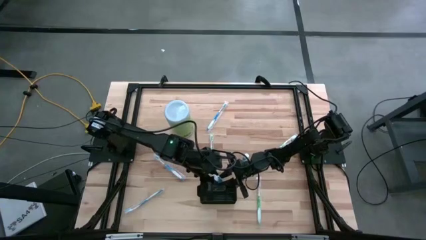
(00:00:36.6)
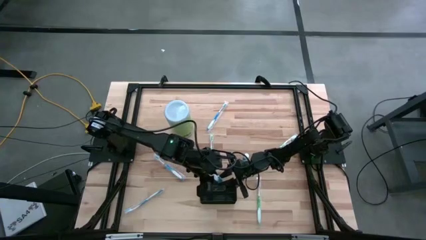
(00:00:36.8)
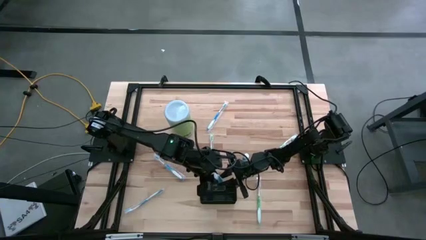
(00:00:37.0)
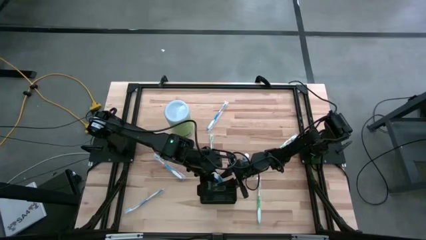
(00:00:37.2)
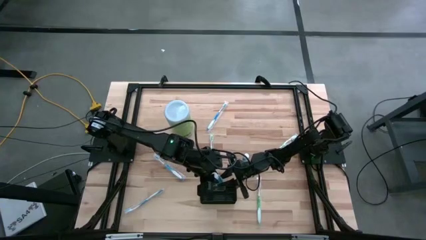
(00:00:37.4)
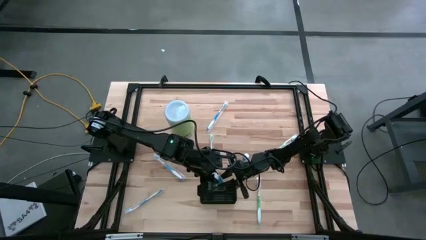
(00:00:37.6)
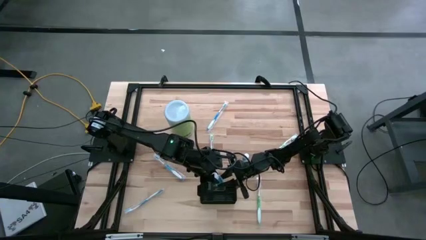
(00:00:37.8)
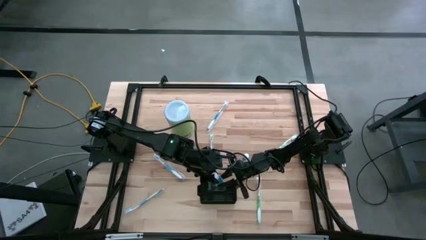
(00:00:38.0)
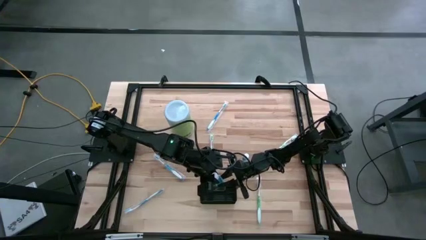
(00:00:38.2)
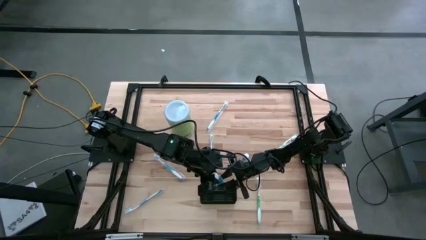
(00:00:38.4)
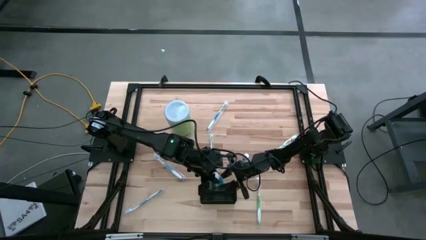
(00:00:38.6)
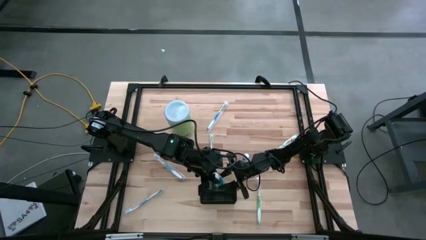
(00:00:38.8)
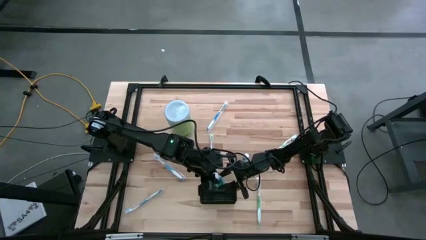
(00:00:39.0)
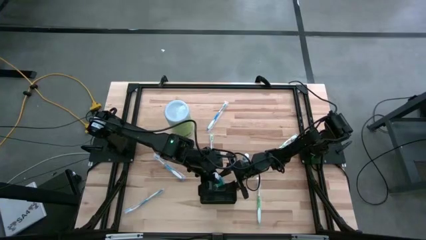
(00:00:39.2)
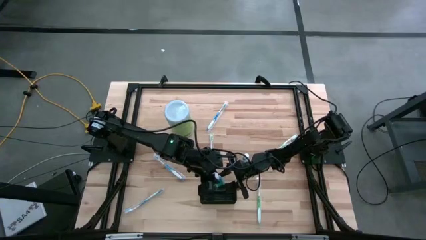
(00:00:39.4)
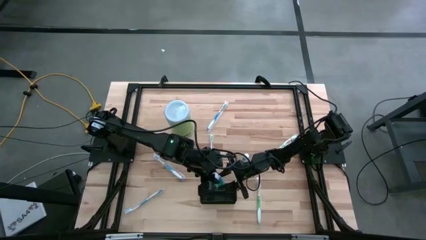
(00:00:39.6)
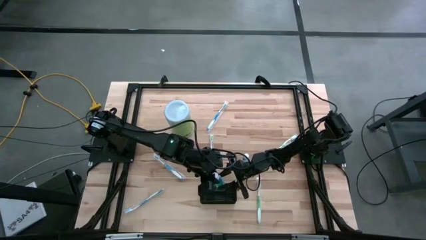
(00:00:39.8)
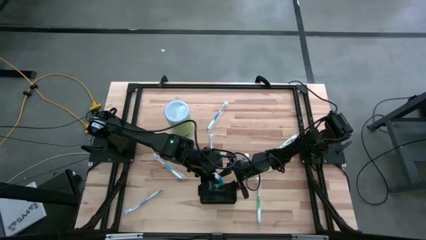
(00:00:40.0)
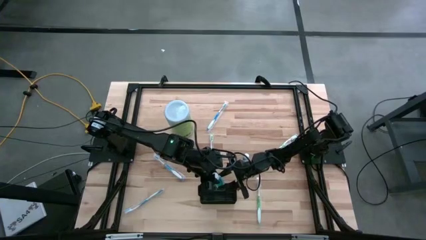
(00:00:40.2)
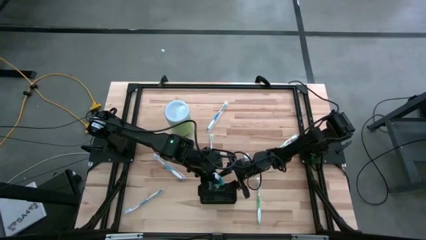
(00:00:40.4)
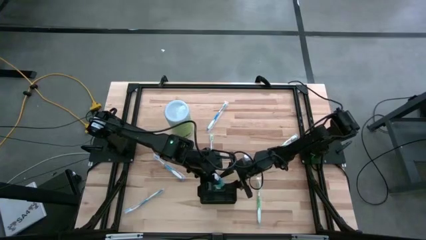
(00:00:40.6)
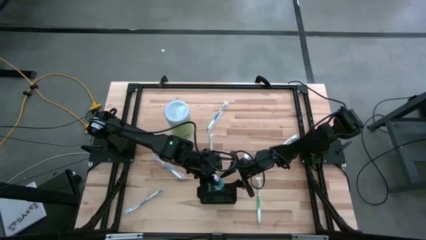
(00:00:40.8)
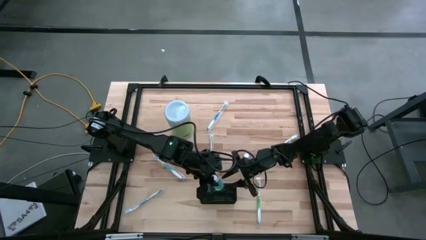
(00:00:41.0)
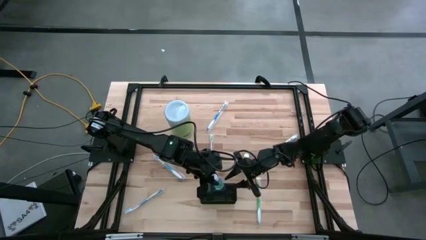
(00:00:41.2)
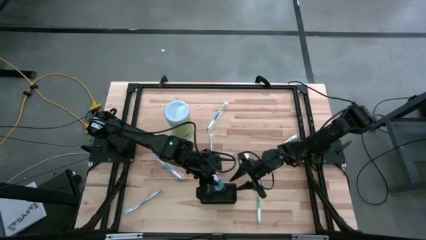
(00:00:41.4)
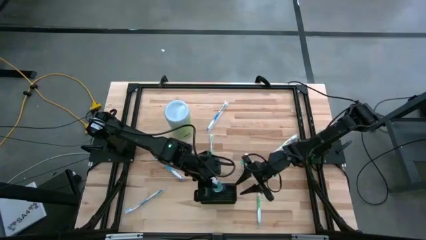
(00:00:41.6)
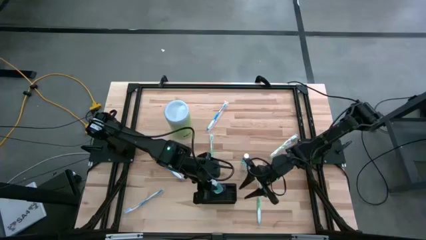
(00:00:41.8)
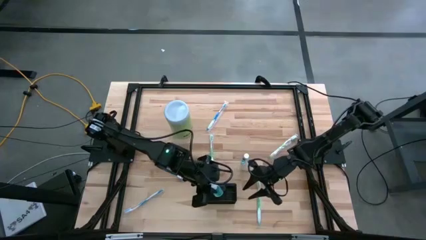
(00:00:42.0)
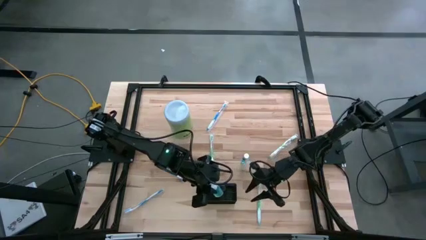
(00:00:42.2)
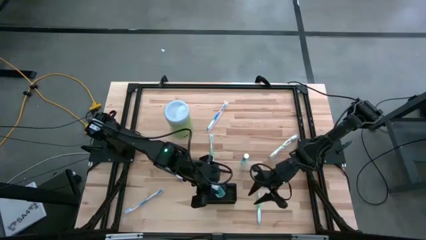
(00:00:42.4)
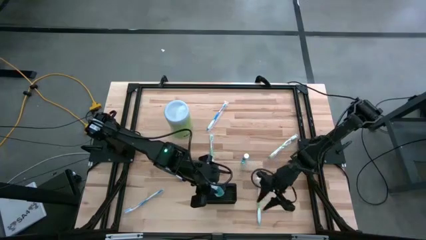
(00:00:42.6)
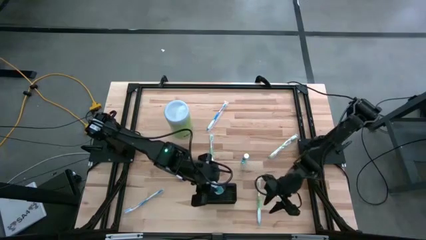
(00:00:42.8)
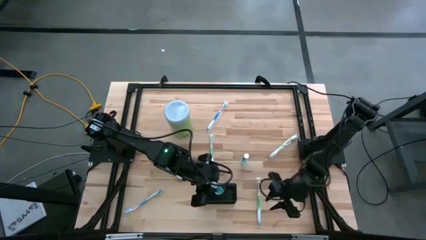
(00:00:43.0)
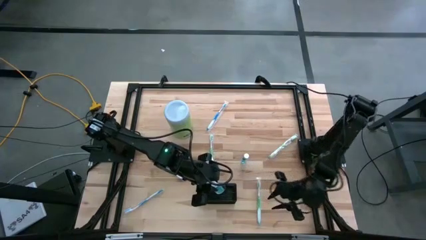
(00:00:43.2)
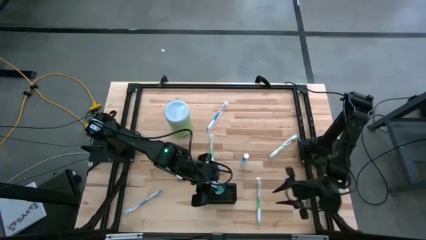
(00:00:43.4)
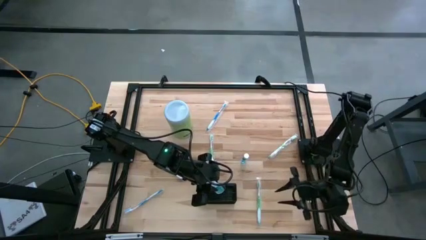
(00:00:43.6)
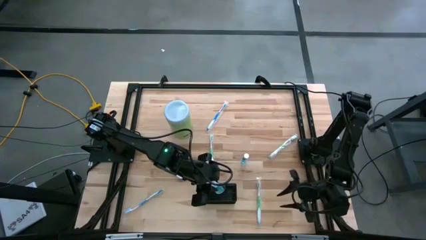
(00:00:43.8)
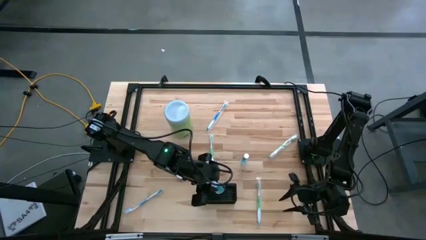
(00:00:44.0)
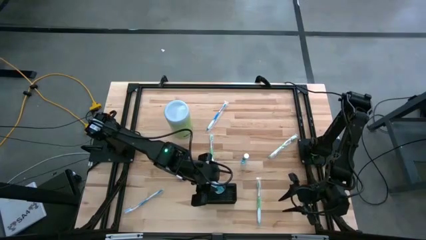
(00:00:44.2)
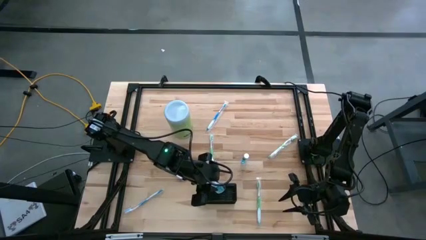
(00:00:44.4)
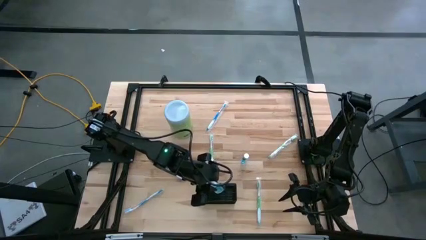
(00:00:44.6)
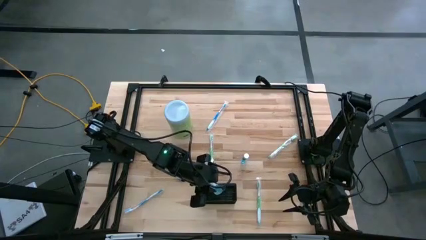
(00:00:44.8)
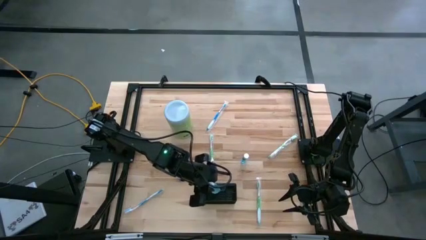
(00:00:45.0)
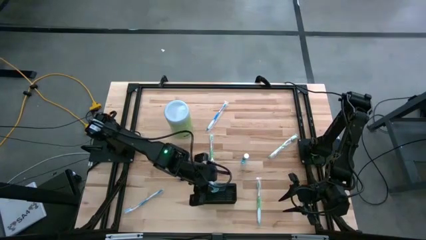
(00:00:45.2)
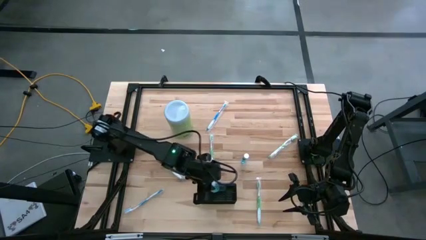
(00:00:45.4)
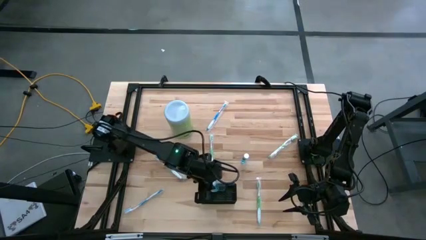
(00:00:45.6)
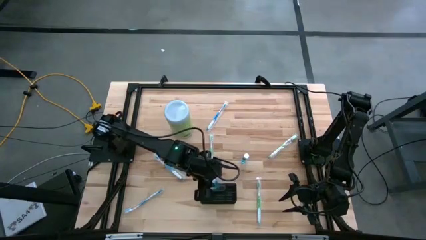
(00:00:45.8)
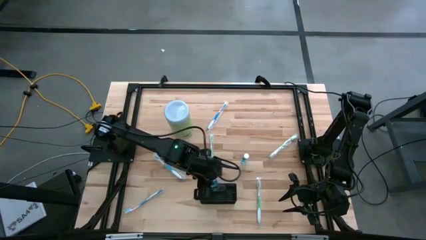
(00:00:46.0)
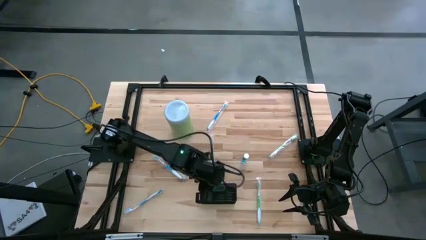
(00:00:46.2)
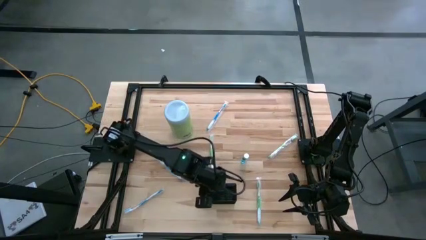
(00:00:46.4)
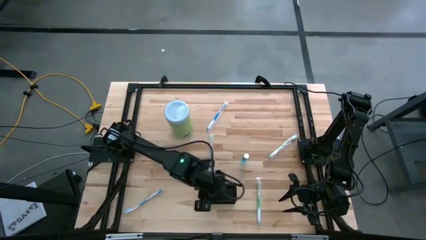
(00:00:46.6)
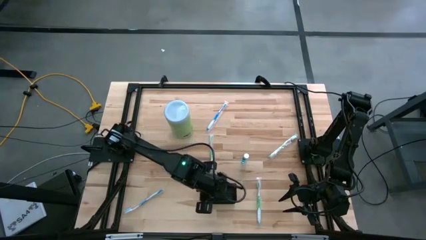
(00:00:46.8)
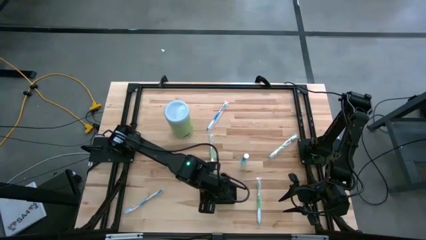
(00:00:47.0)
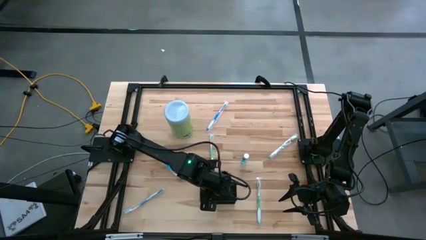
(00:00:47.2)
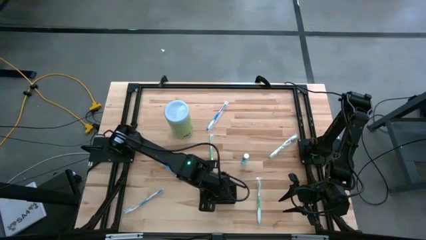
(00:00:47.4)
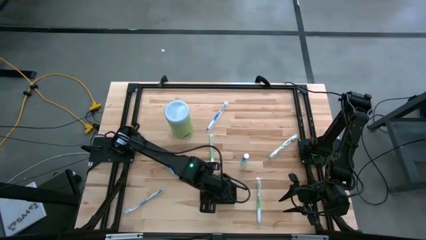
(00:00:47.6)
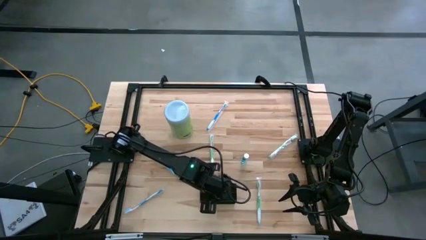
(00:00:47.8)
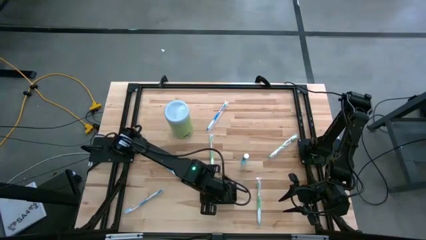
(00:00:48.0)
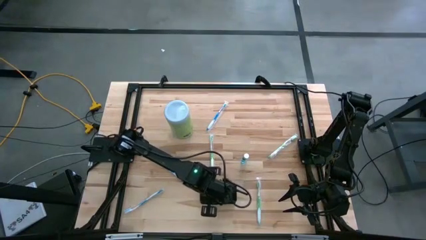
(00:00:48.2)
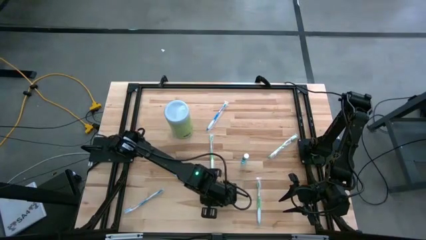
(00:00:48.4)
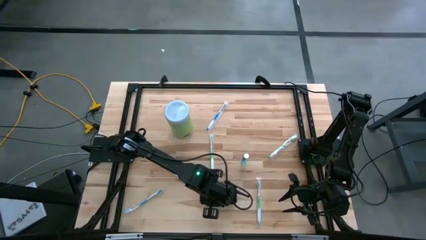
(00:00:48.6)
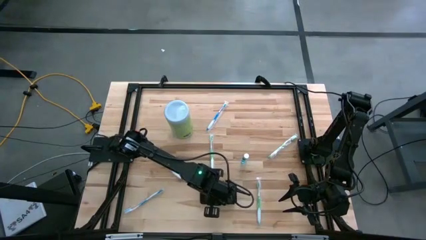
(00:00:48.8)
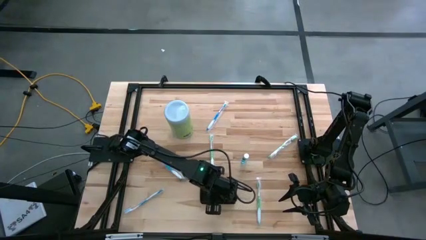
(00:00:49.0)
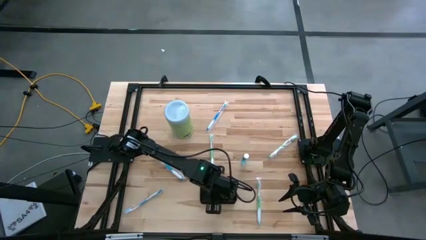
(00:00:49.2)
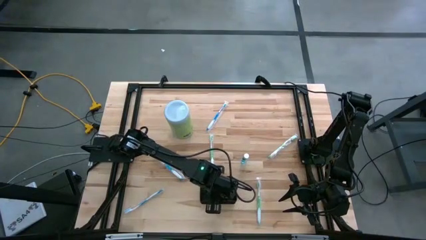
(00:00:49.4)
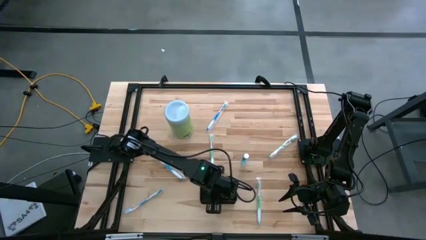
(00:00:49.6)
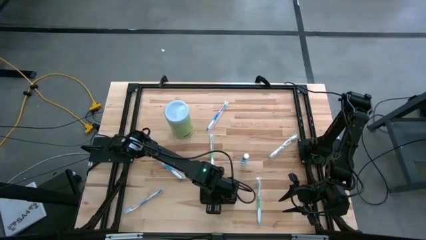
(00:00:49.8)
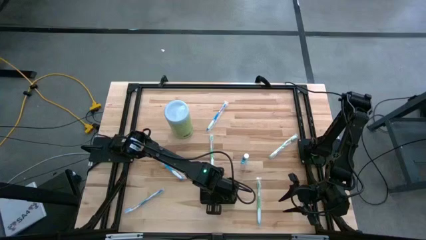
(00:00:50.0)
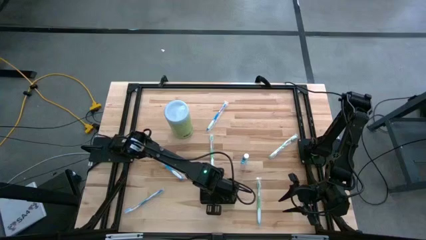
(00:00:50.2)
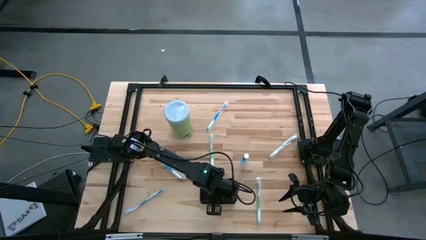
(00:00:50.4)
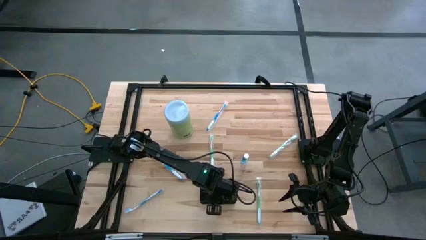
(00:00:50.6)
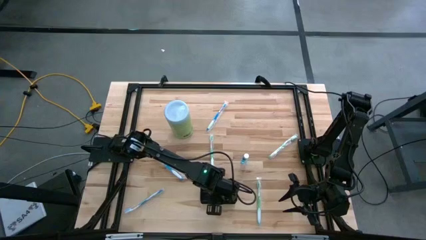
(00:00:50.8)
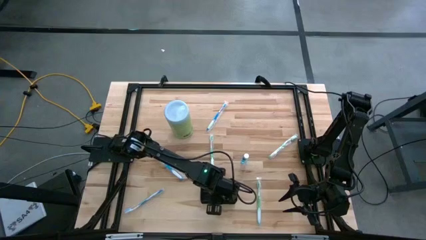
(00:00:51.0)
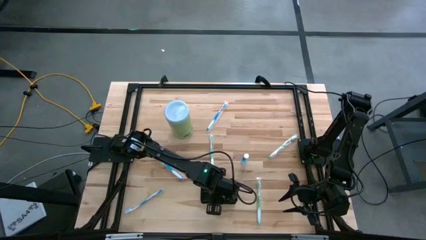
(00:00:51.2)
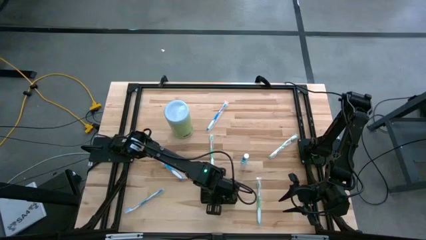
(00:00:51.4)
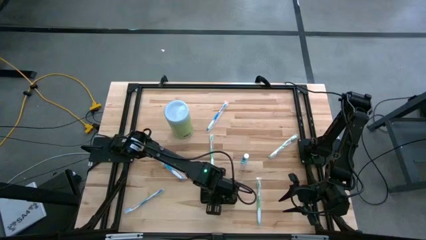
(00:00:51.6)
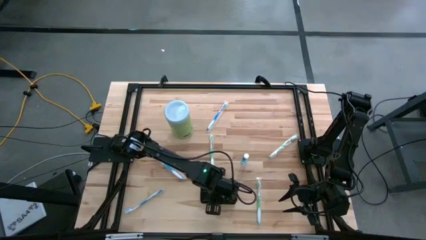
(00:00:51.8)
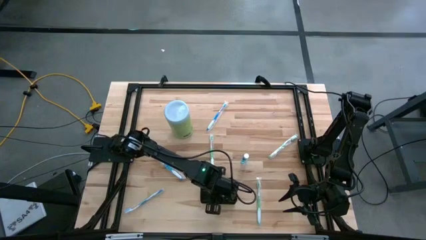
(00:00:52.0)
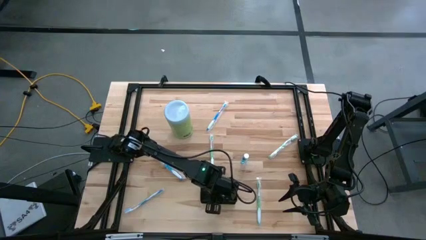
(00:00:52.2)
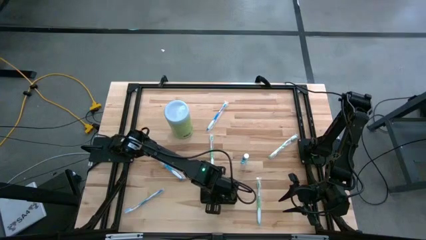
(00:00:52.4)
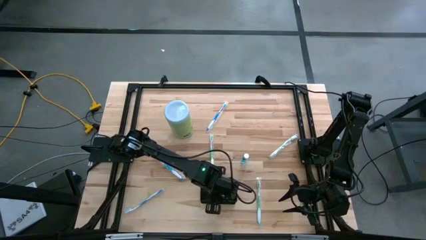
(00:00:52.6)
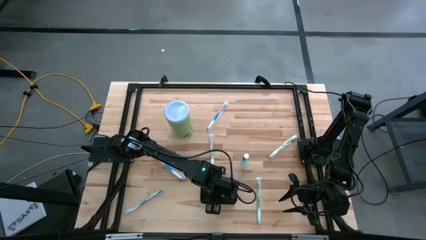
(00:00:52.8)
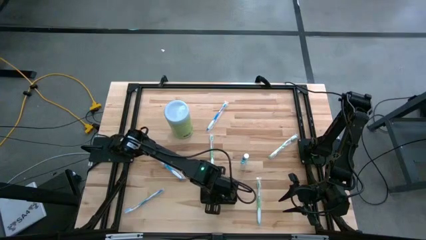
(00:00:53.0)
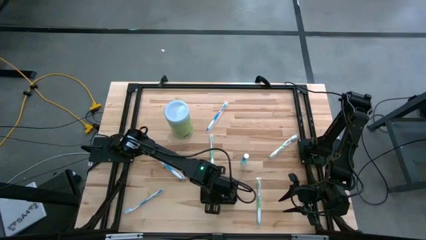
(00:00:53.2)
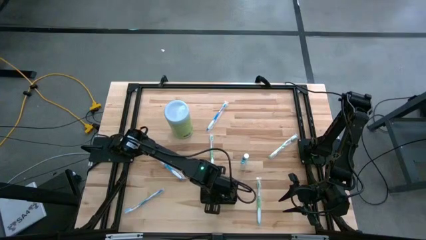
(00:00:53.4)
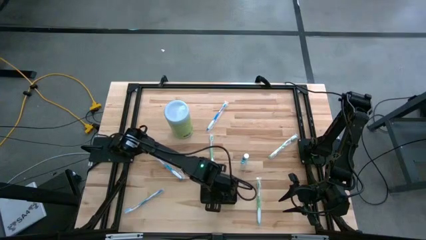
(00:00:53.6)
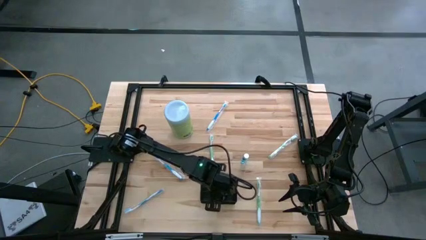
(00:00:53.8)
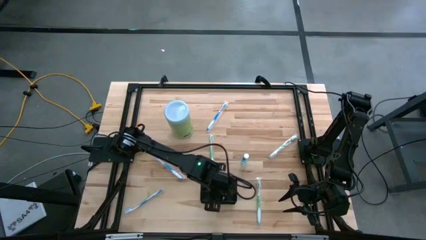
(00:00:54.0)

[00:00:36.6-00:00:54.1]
Task: Pick & Place toothbrushing station
Put the bottom mouthwash into the mesh organizer
